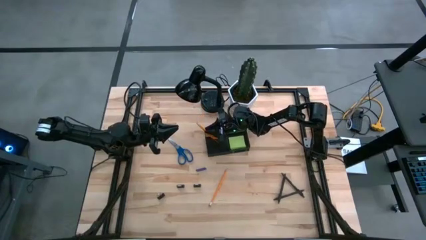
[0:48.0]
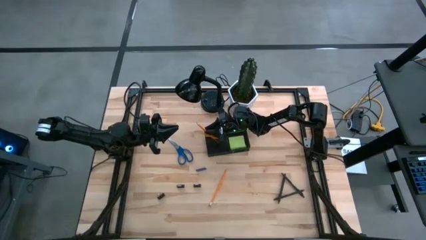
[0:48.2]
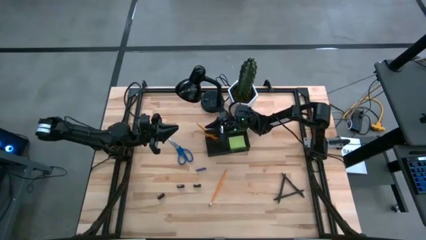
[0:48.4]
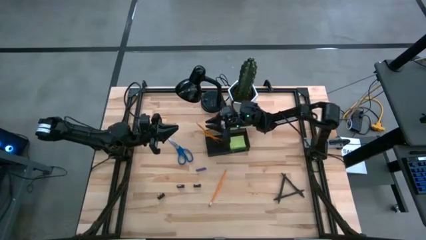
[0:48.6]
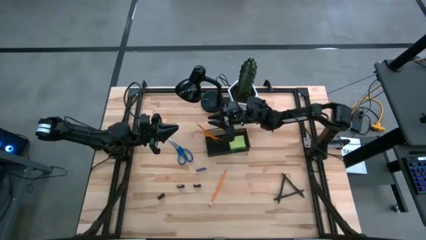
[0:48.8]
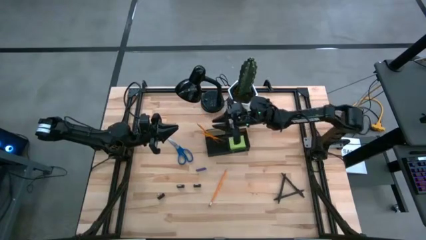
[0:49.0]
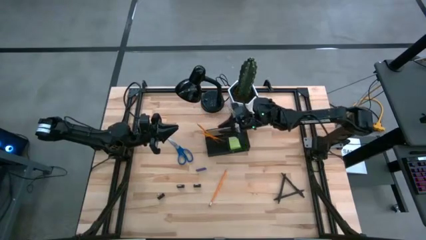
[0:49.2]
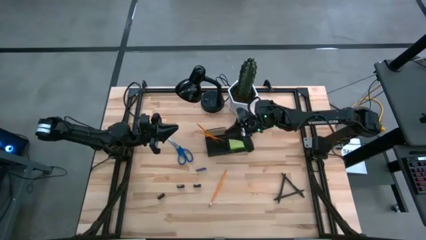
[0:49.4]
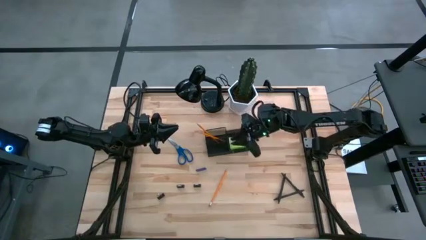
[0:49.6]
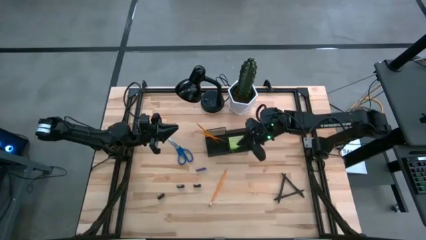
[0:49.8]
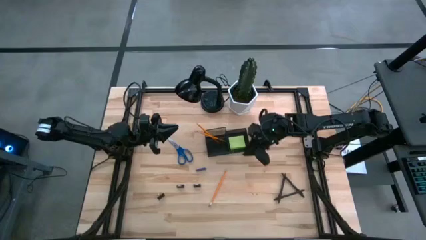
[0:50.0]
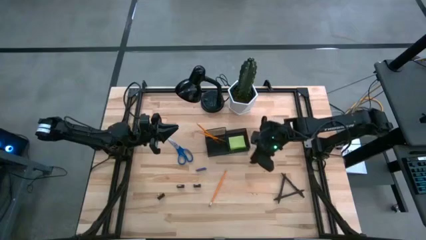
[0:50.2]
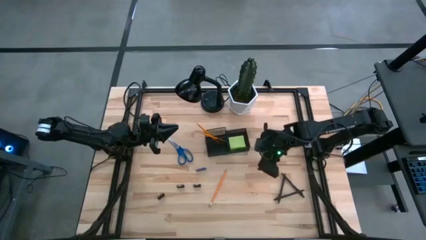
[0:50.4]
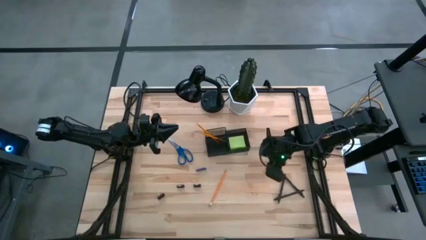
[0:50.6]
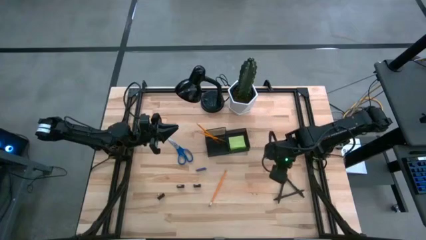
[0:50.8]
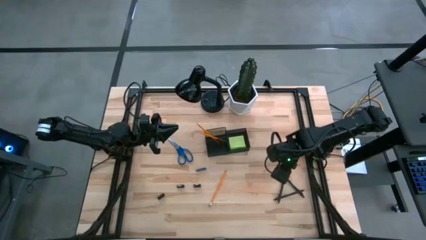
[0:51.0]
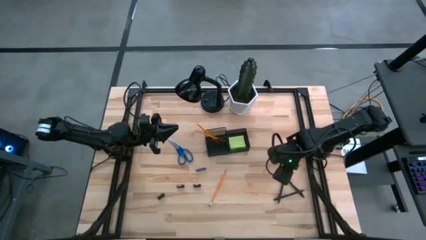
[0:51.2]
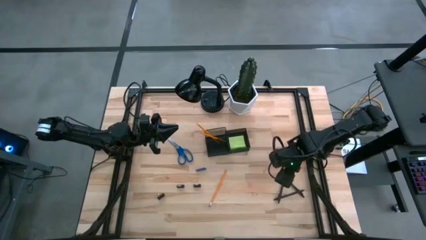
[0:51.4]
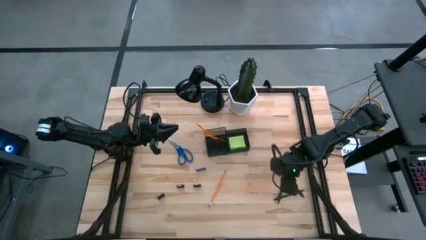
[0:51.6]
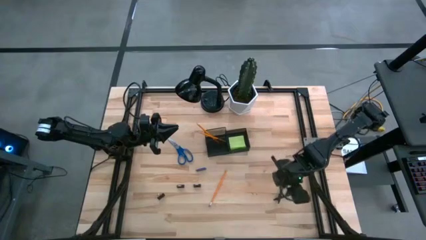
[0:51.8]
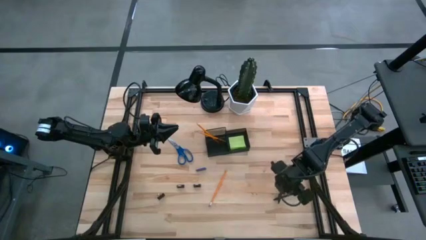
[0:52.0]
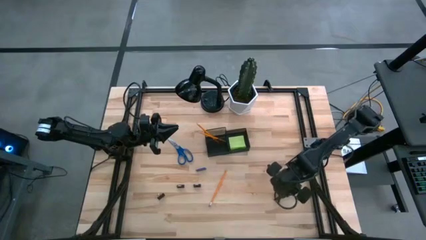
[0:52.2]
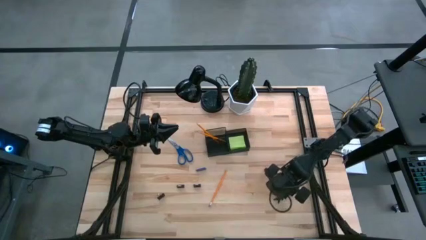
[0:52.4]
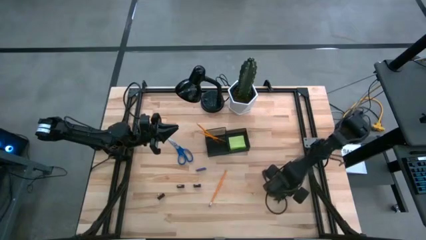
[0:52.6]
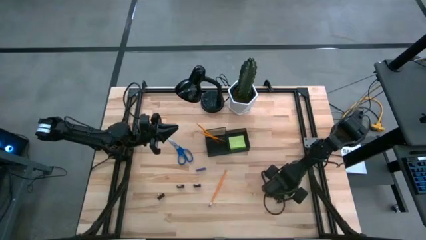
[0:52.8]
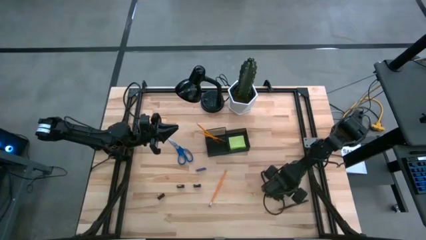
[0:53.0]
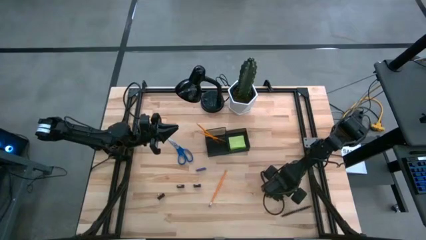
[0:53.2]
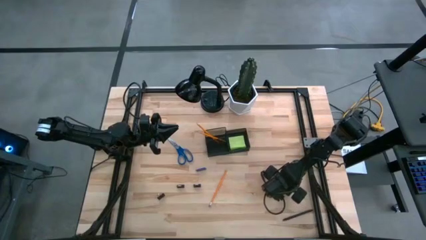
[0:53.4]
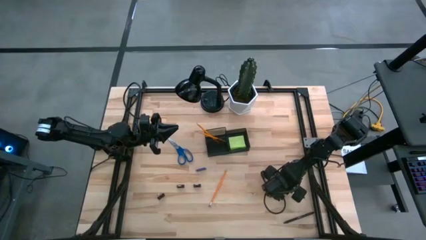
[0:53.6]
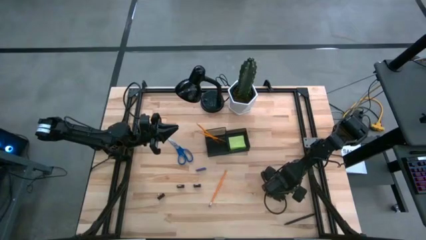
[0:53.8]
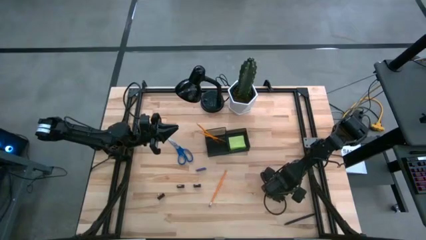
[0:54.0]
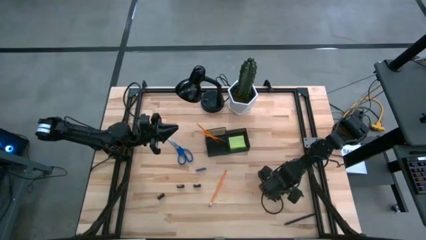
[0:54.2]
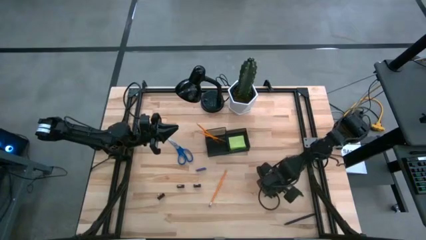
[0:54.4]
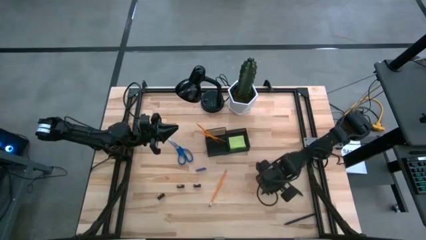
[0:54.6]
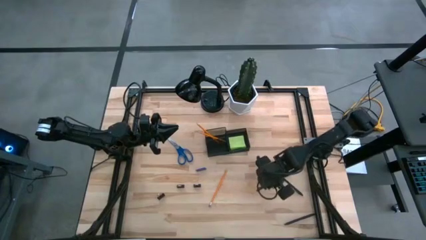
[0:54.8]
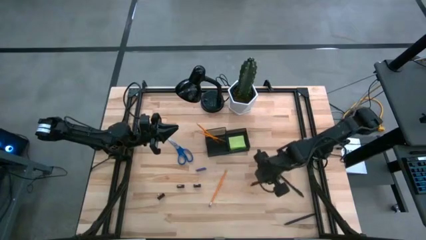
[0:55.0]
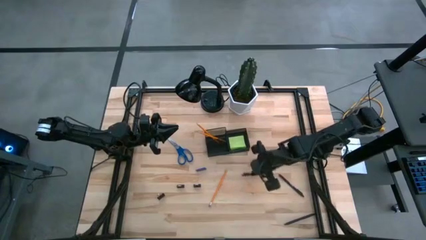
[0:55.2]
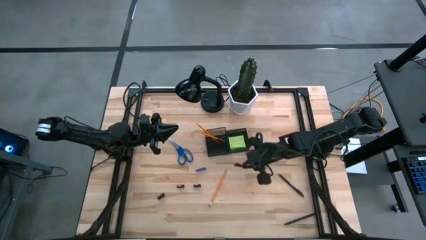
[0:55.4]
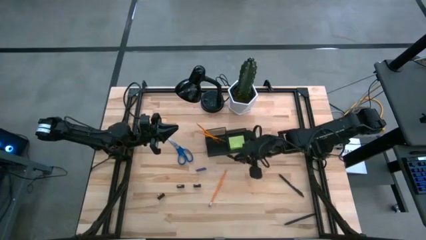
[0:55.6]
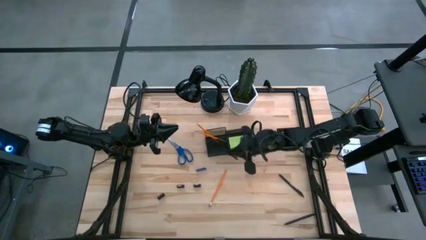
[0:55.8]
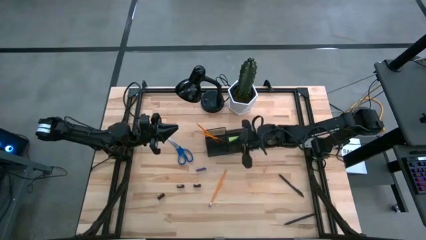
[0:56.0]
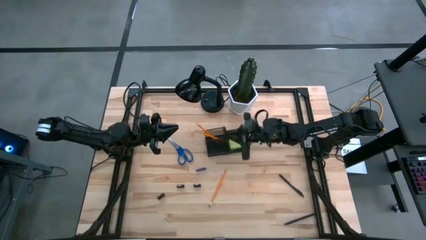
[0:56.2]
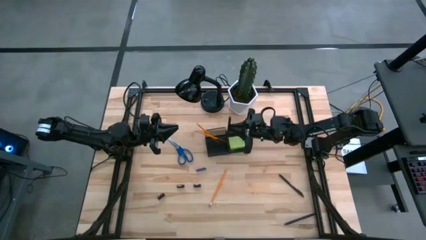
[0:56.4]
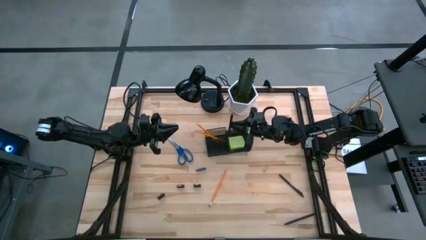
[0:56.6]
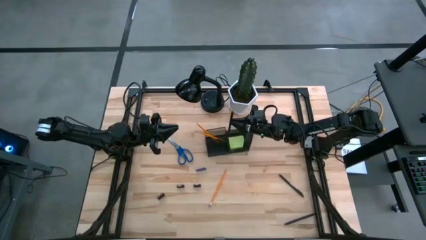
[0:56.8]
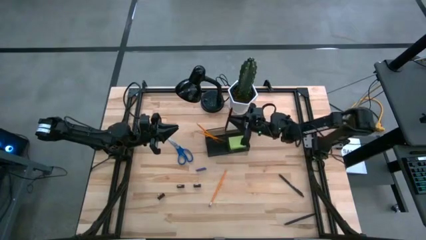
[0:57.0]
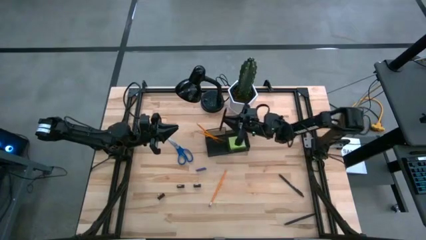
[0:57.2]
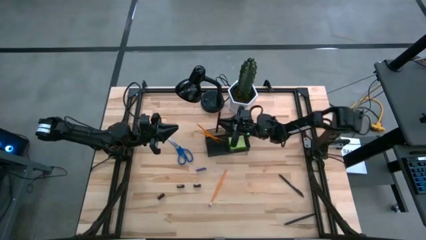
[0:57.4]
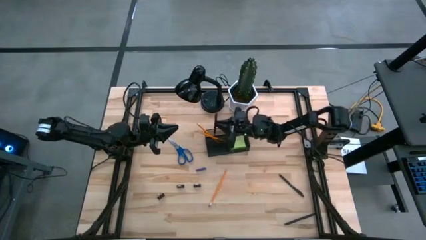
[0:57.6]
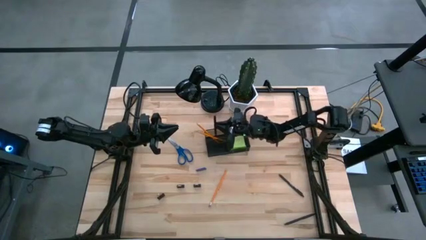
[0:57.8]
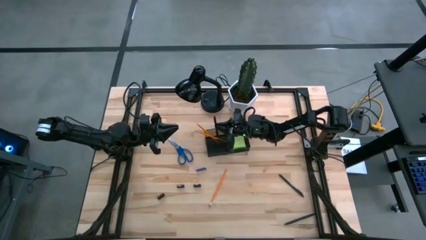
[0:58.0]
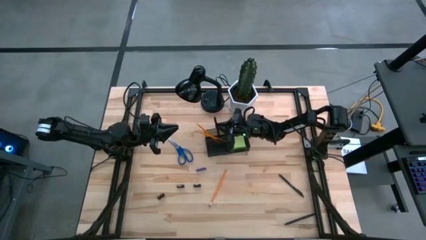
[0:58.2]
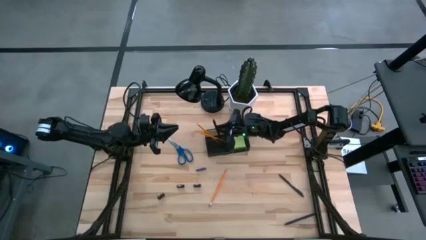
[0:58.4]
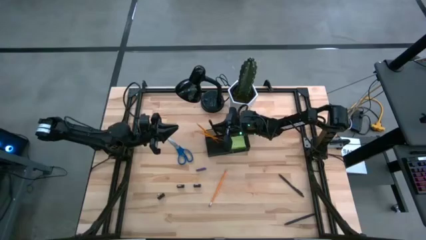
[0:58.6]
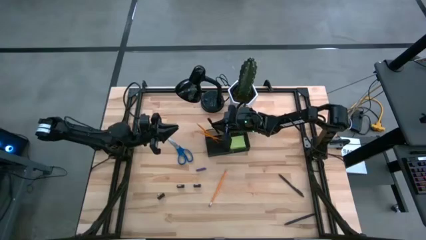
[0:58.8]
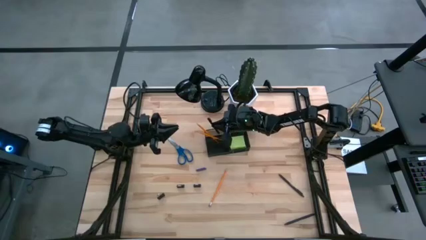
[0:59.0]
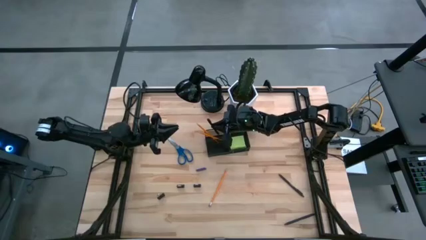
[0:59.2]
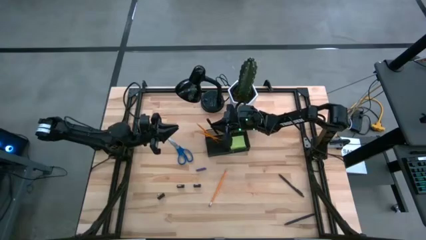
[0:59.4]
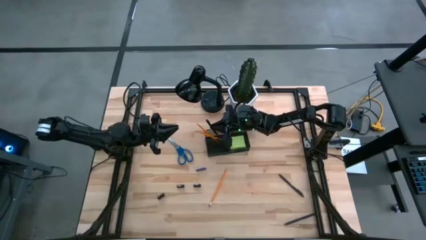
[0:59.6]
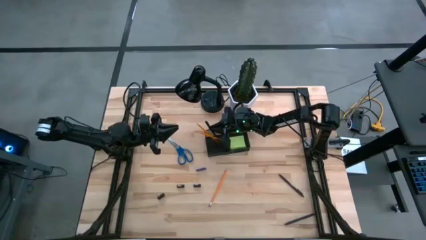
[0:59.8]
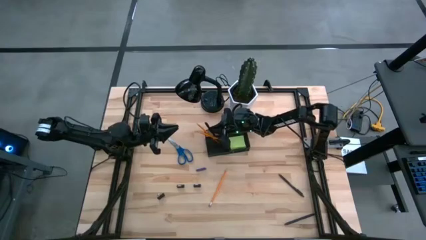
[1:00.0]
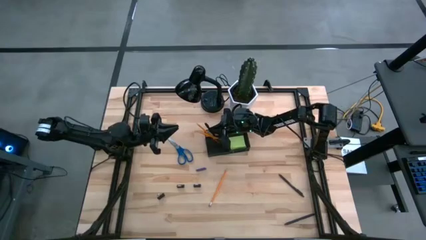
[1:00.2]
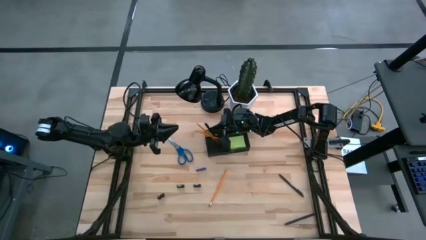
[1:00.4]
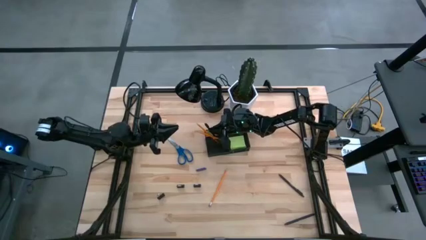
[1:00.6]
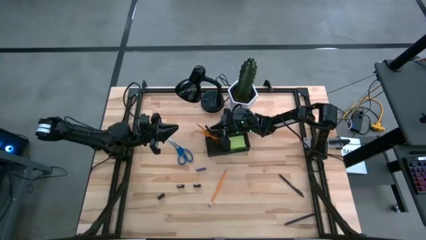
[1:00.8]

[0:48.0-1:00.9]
Task: Pick and place office supplies into organizer
Put the black pen into the desk organizer
